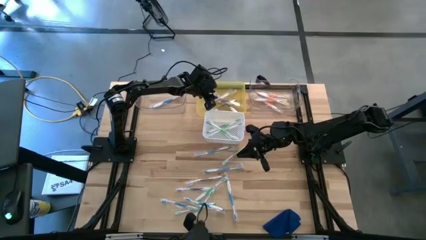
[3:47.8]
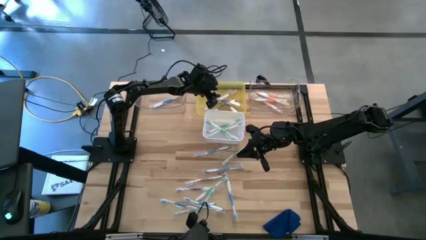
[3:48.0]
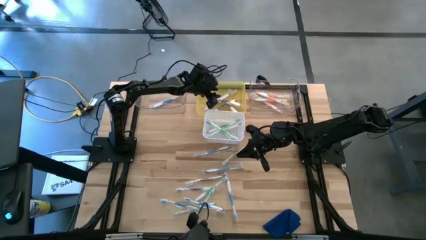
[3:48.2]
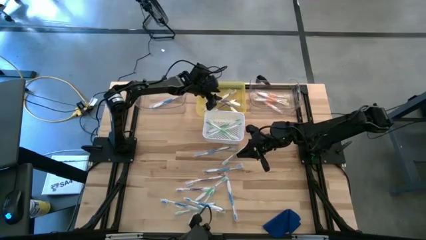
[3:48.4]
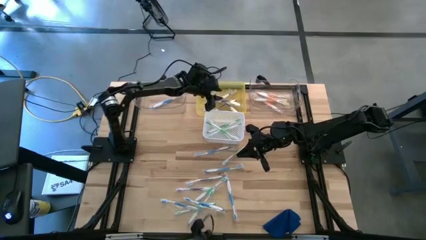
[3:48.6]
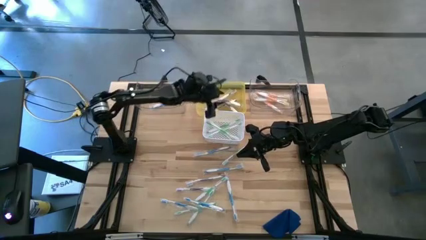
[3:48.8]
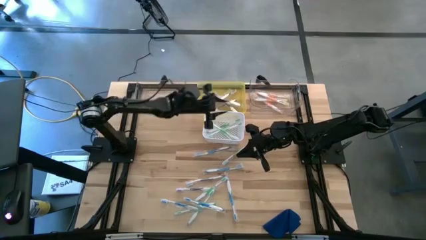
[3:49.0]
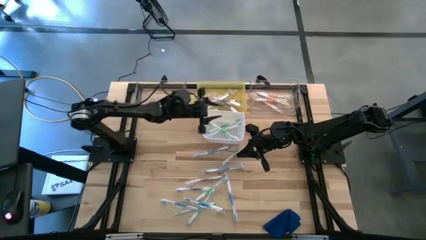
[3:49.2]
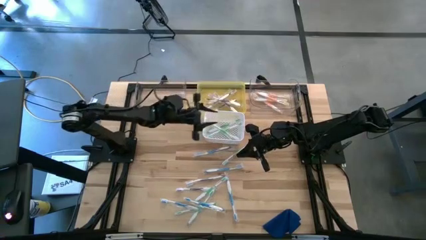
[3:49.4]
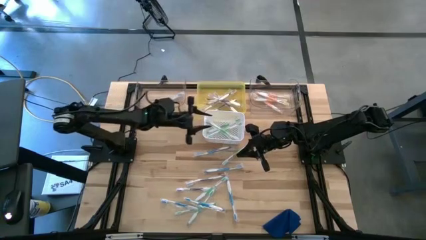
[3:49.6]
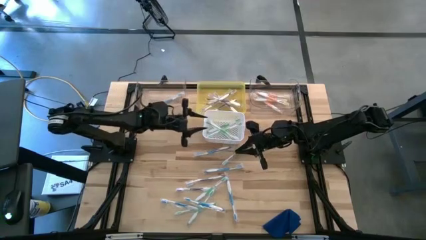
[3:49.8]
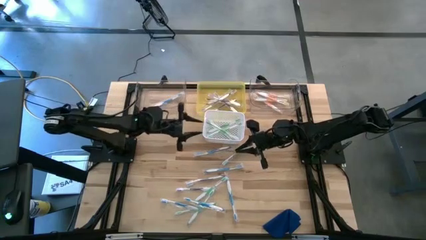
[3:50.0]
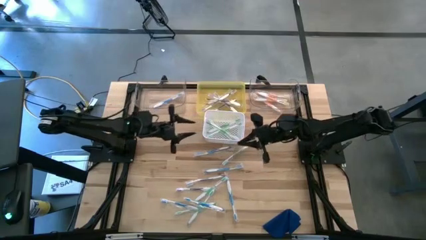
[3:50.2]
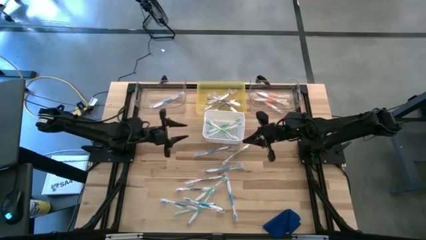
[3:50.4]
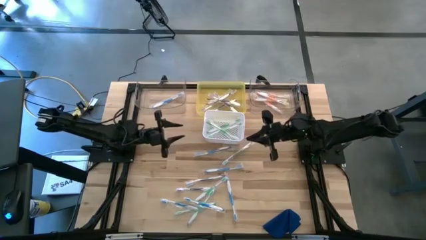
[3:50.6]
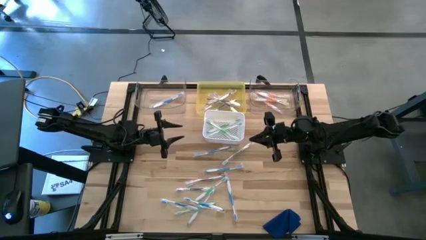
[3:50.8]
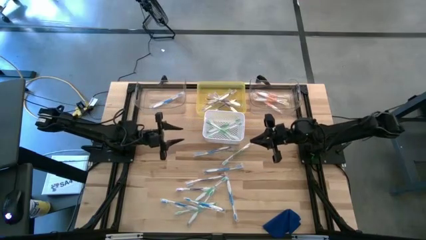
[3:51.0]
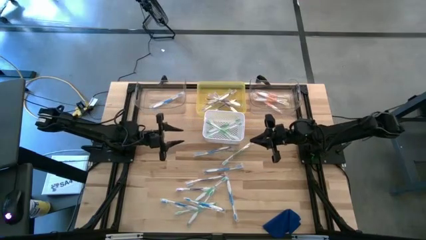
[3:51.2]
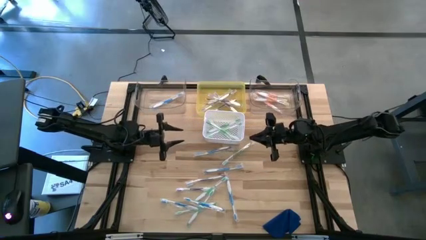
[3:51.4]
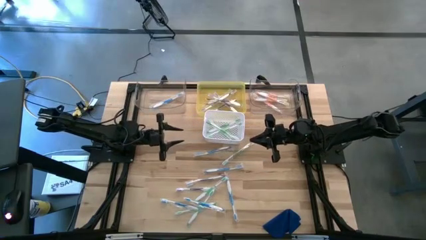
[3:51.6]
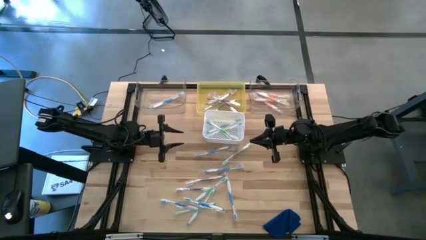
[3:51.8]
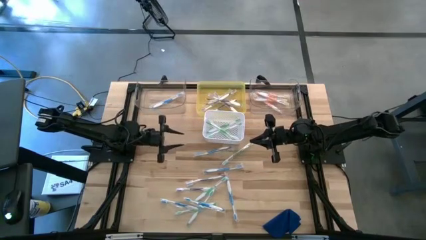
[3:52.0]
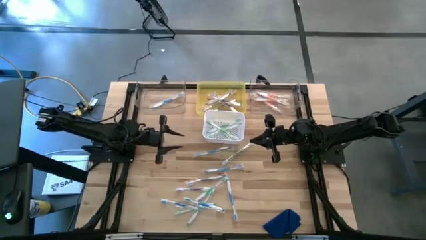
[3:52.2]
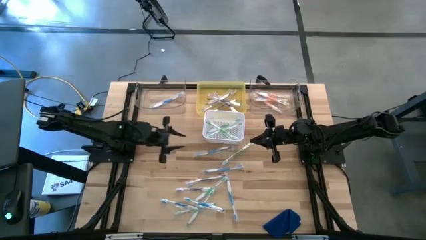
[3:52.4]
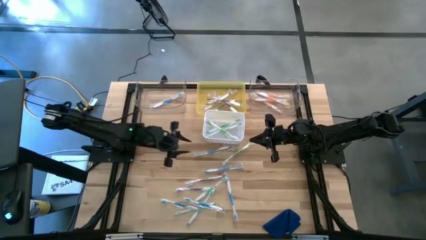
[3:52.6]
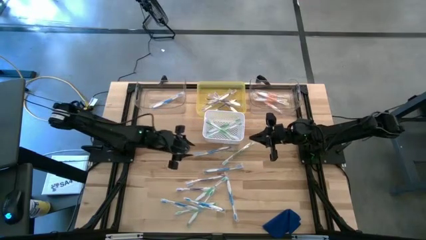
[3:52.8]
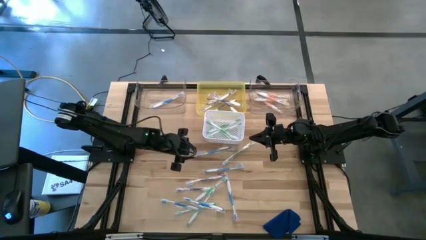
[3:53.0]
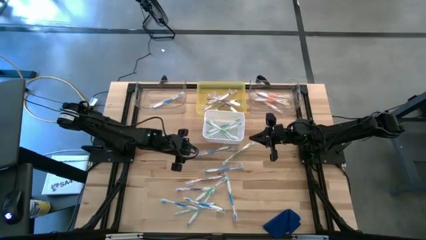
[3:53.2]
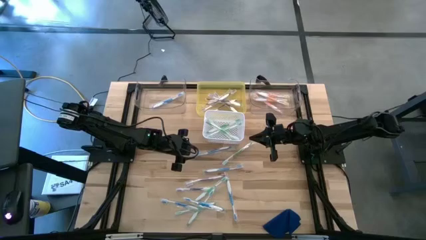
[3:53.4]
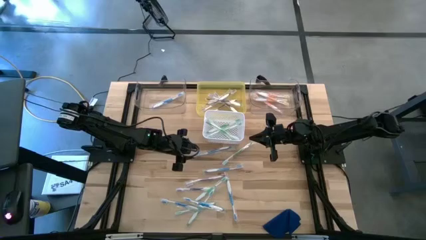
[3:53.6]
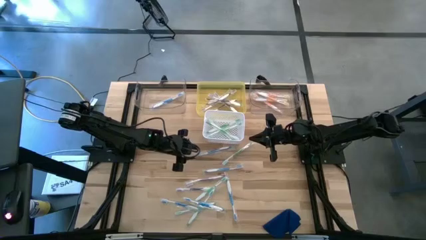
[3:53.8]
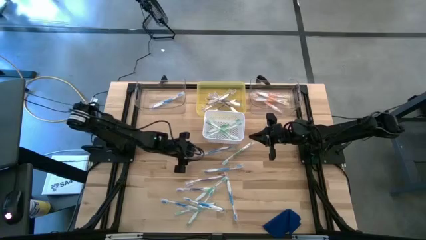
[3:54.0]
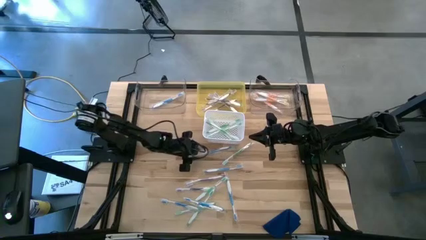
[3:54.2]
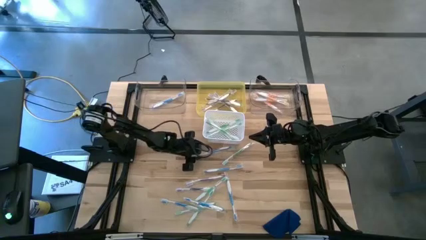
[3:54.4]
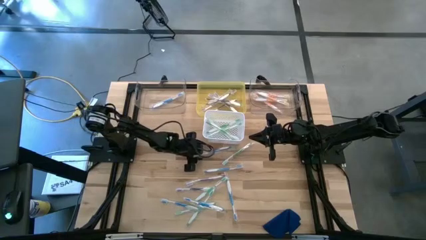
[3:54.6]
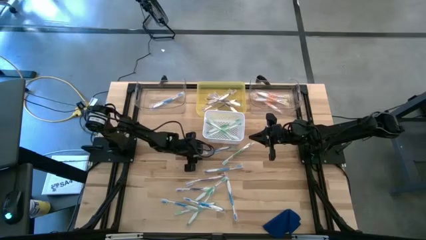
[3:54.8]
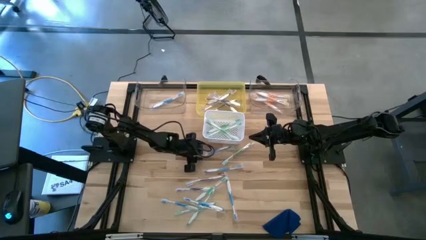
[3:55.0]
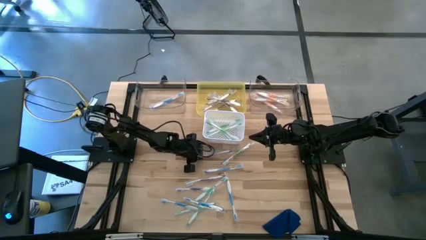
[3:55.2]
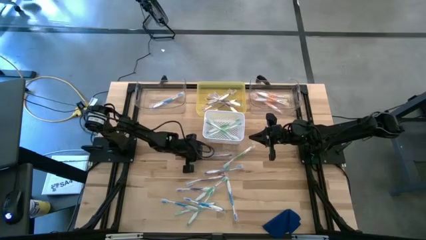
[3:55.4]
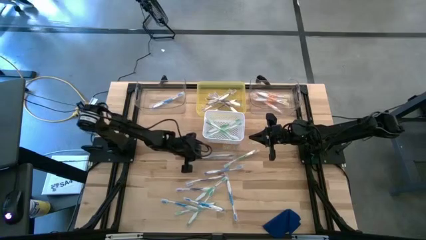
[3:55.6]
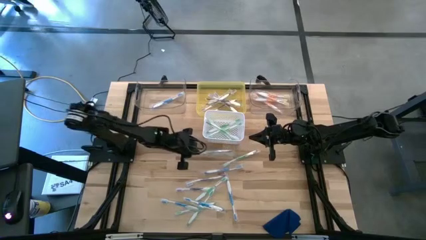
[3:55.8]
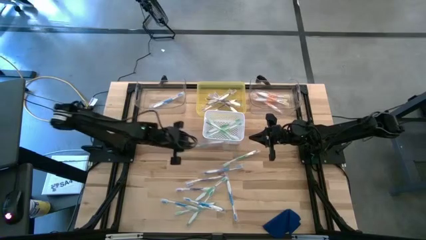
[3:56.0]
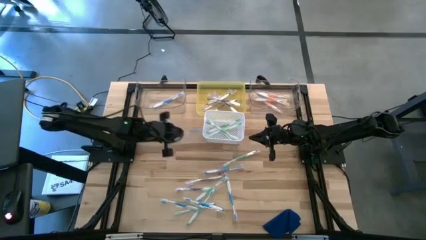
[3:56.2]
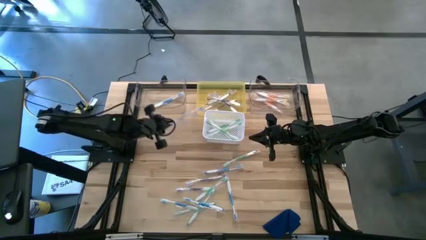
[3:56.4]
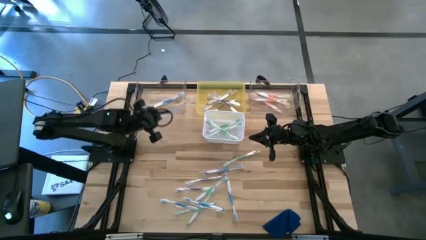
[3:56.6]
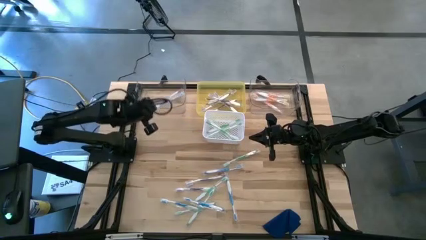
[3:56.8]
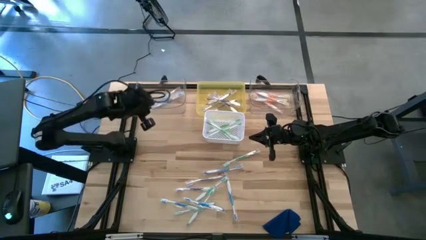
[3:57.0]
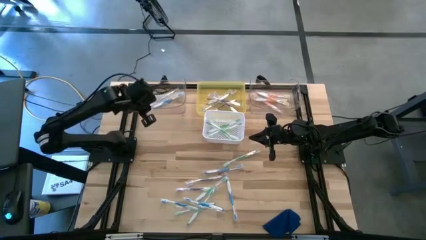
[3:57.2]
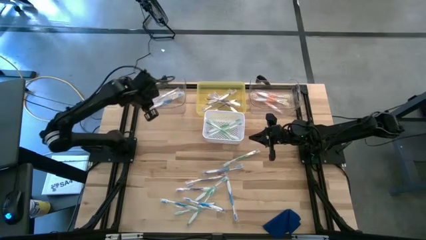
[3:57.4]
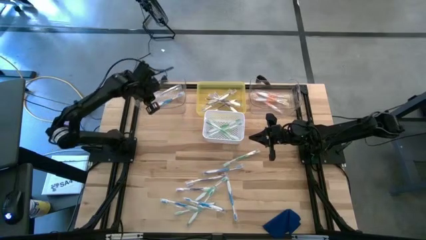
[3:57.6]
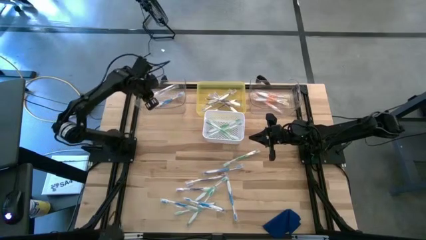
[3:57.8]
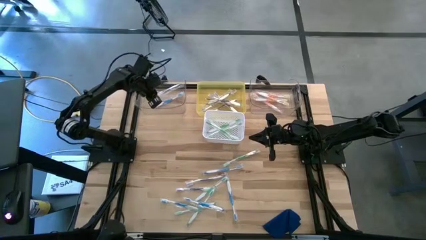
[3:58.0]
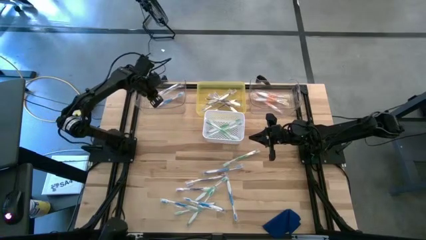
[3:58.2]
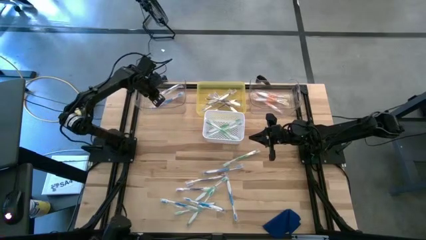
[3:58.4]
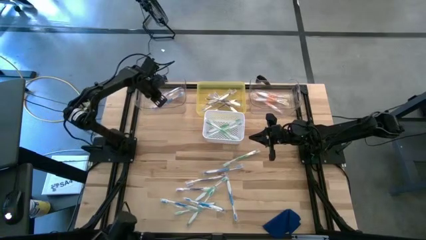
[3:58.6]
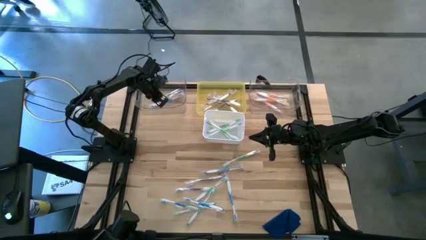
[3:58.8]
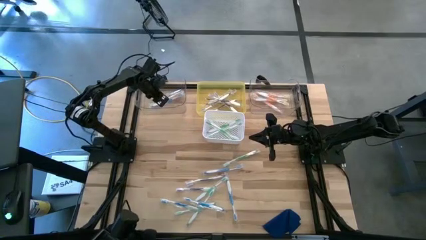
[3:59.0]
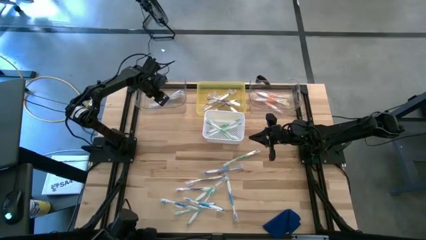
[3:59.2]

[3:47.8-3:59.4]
Task: Pick & Place Toothbrushes
Put the blue toothbrush into the left transparent bin
